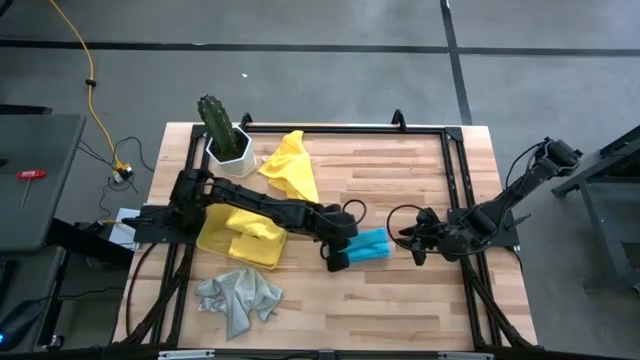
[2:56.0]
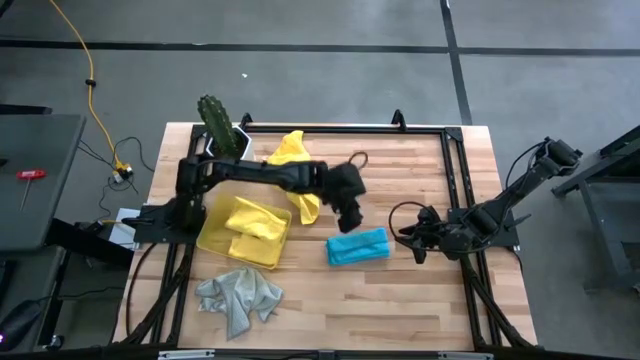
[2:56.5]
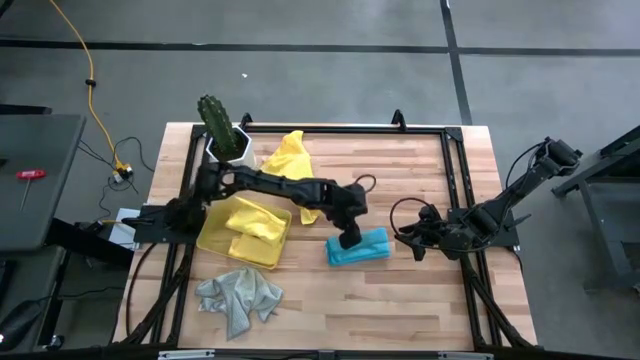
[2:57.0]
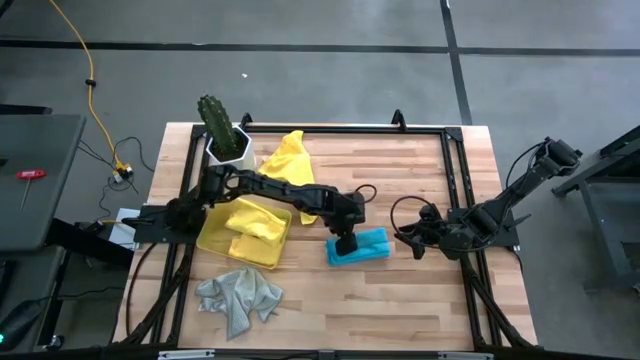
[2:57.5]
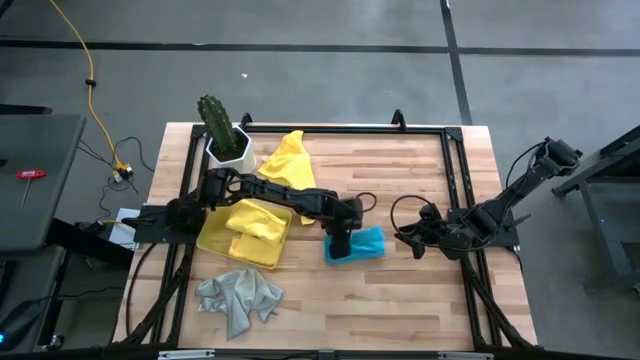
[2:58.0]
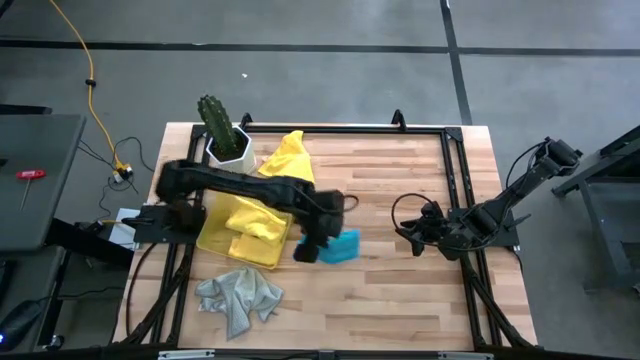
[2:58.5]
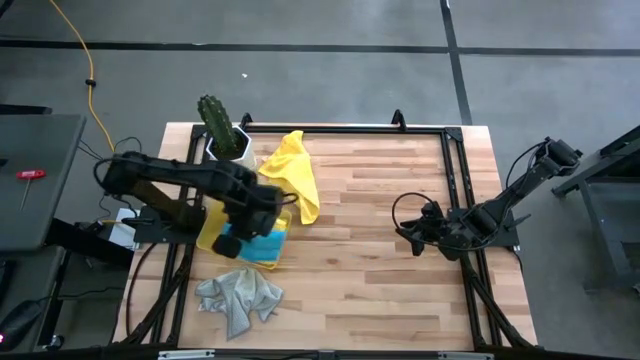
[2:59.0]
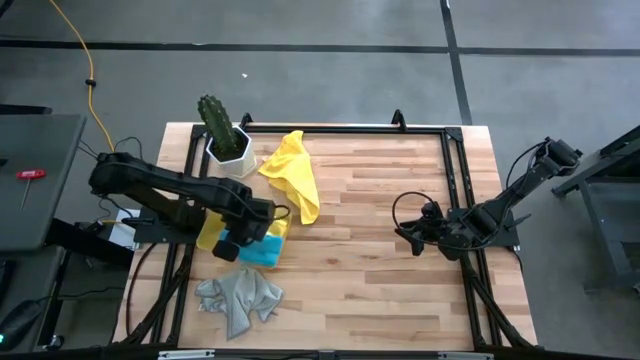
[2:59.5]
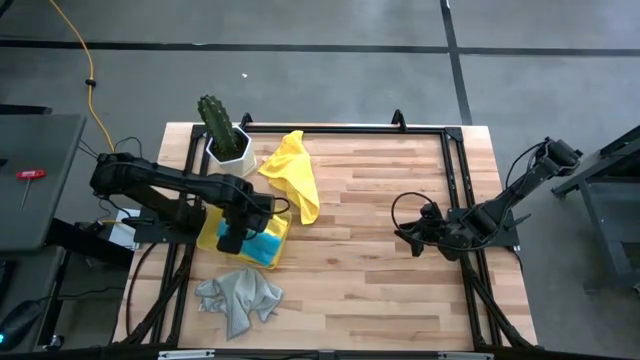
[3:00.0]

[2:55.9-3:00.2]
Task: Fold microfiber towels
Put the blue microfiber towel into the yellow bin

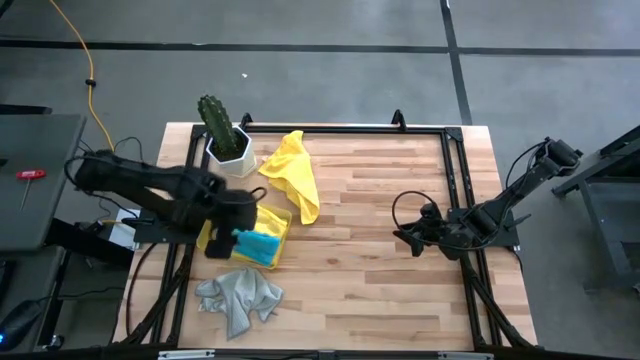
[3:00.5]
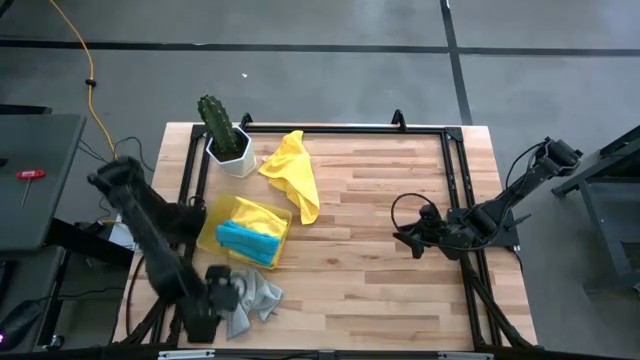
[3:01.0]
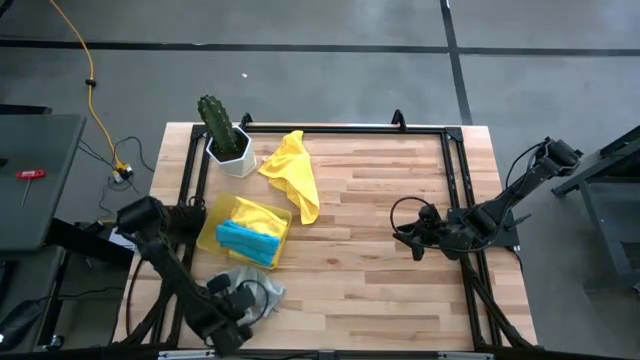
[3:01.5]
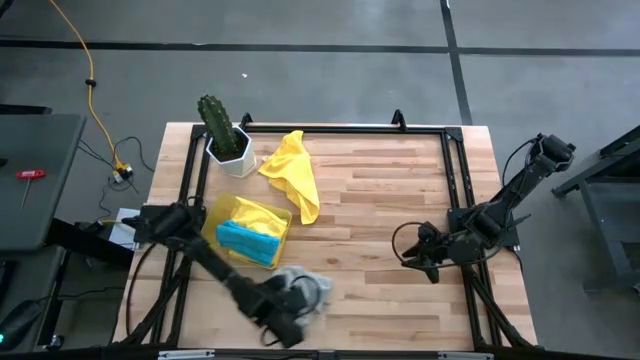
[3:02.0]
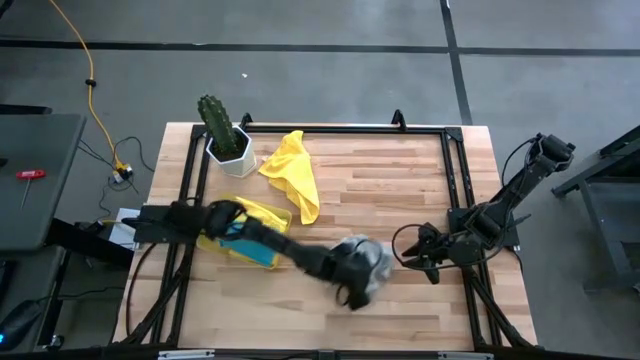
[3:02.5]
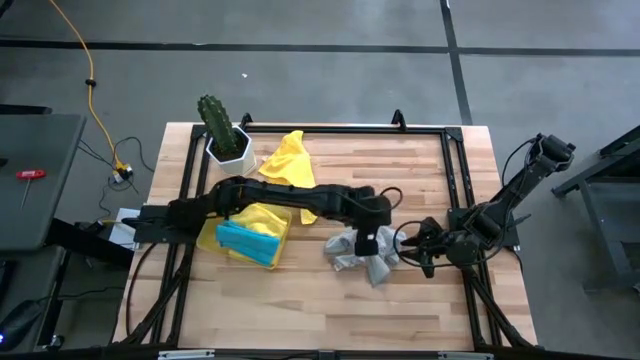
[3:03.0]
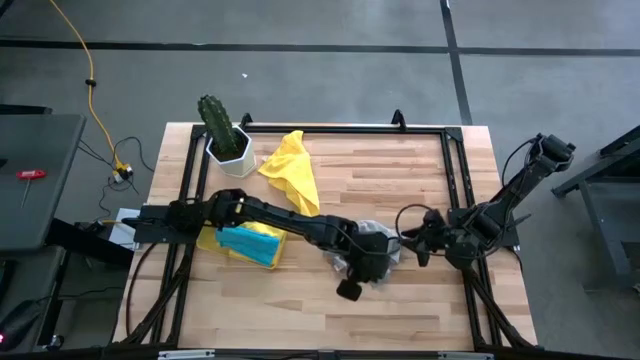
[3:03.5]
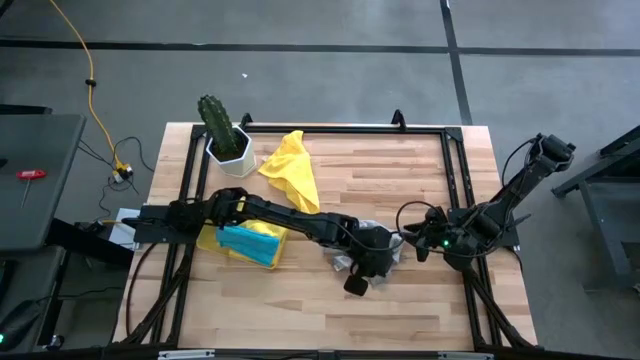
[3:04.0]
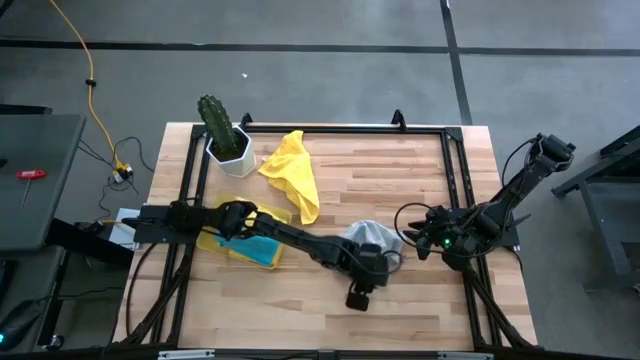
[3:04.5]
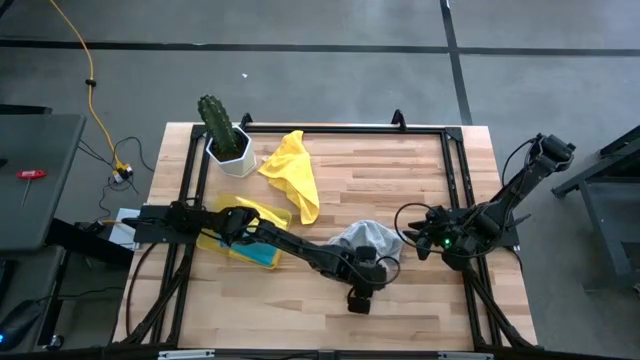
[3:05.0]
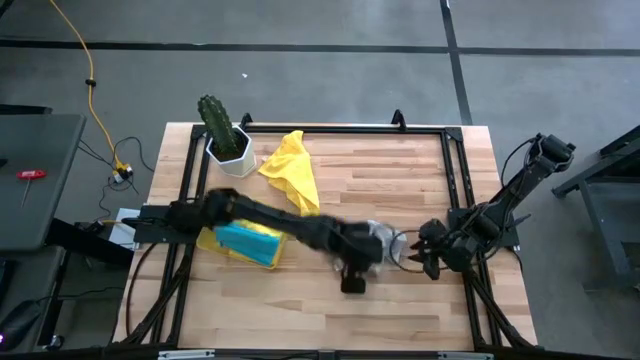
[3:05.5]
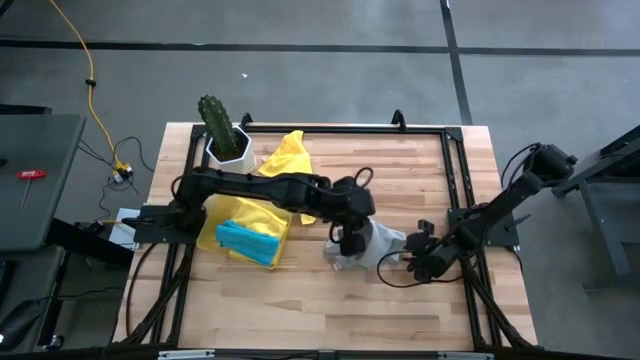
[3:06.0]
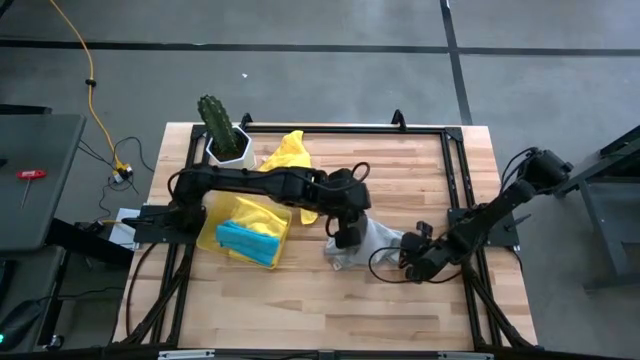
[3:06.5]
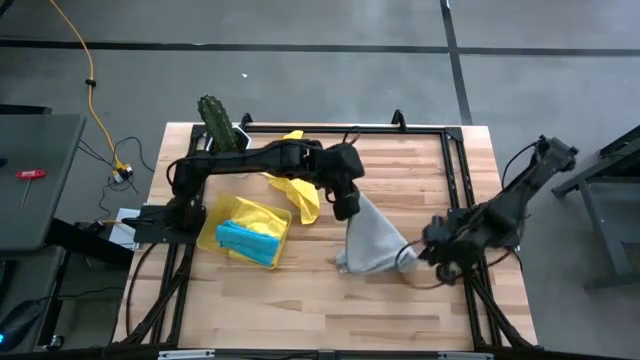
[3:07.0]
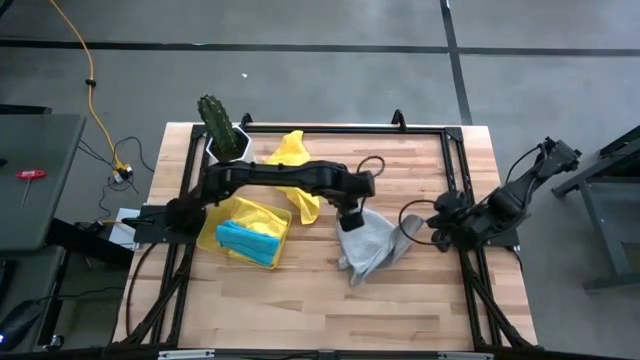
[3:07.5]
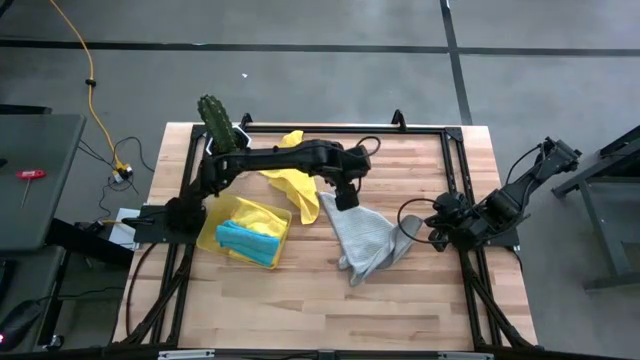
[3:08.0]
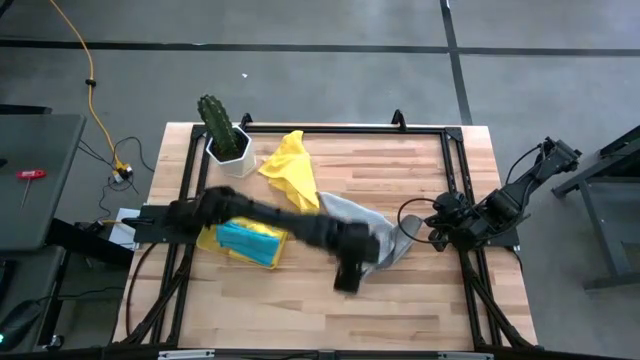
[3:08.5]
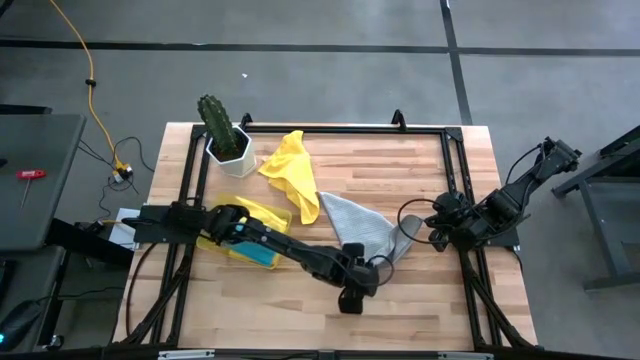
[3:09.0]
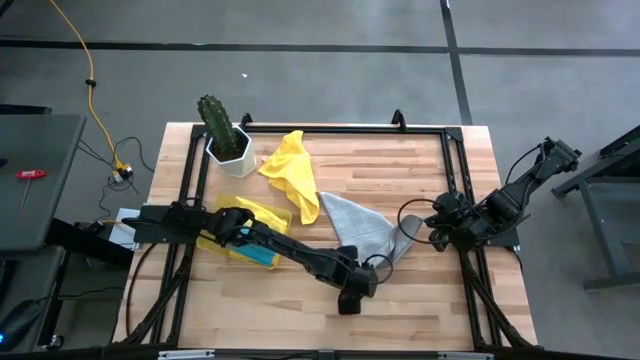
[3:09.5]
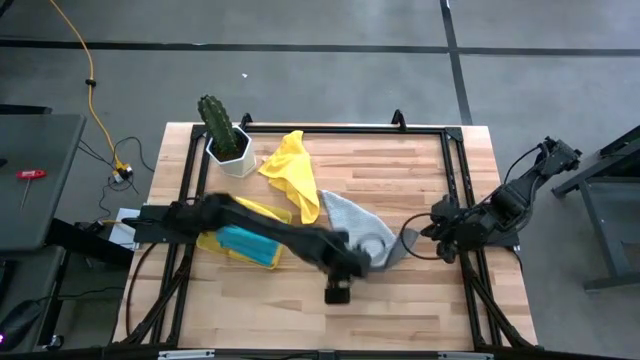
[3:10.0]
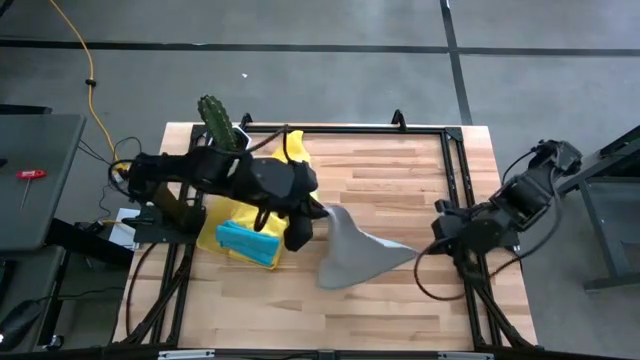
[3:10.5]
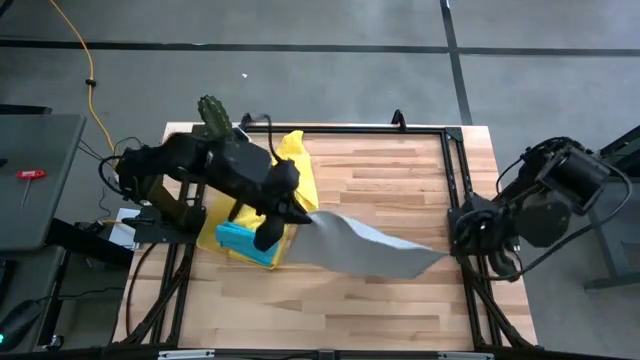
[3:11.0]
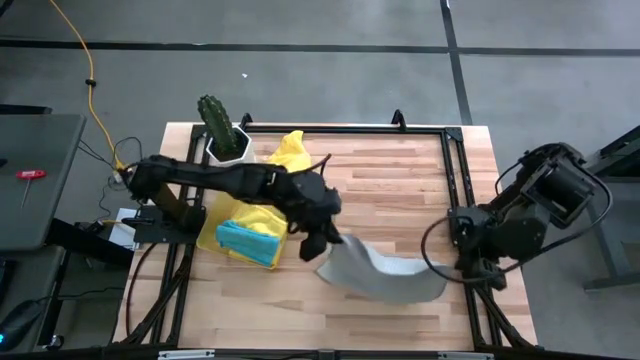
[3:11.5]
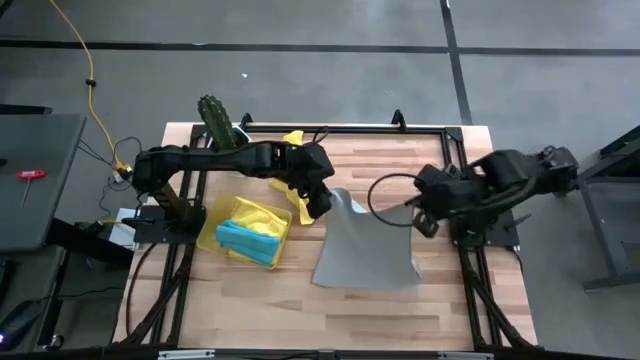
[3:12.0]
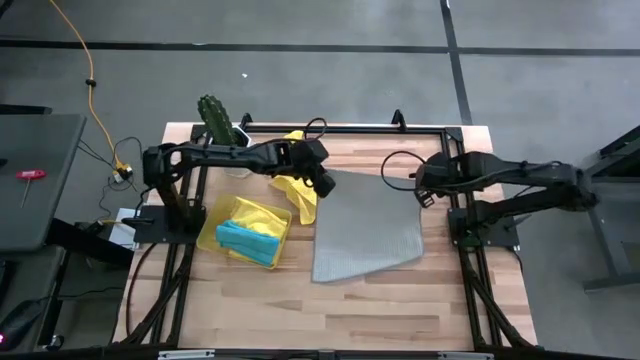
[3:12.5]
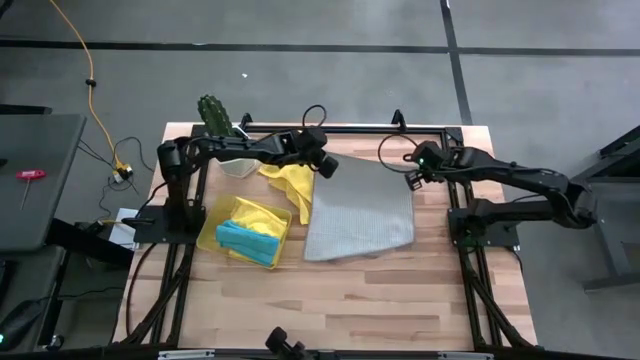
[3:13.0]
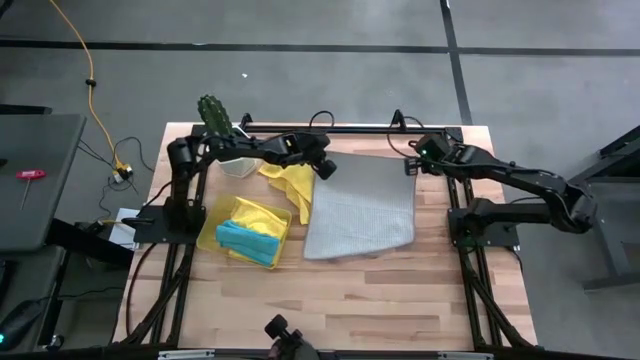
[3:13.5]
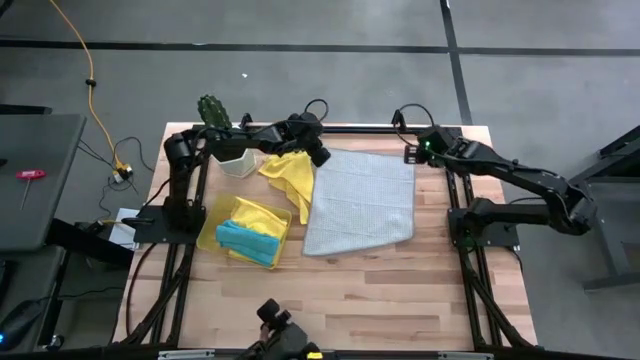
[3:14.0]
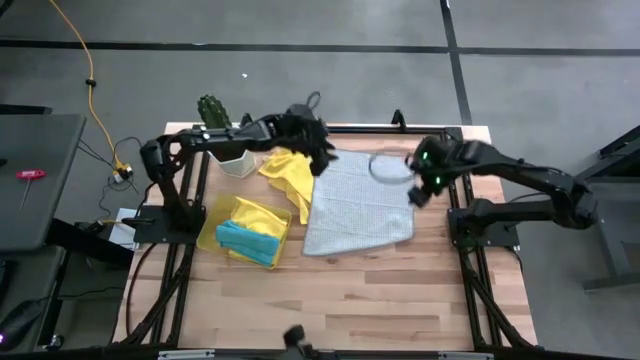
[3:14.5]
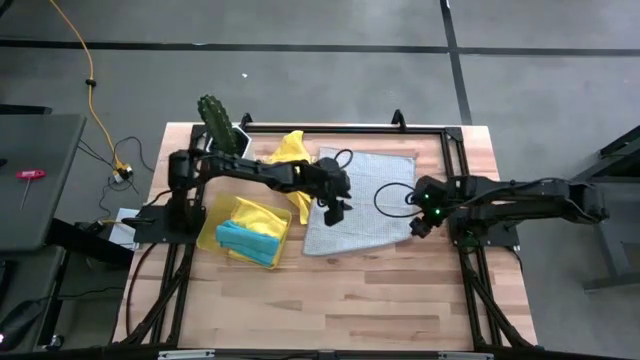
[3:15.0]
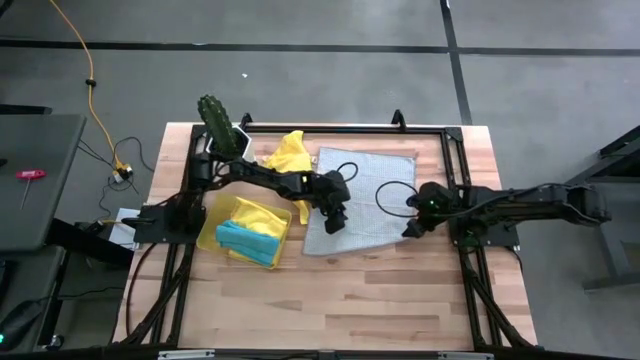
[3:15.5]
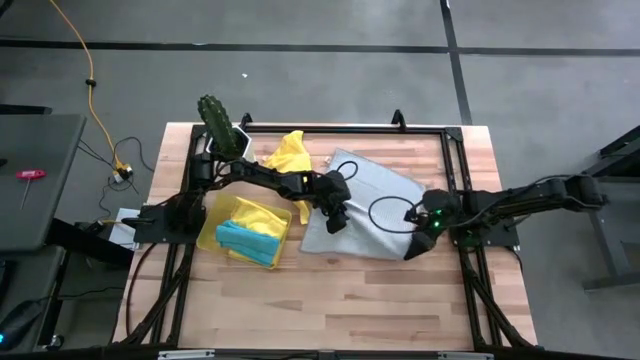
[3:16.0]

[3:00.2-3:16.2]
Fold the gray microfiber towel
